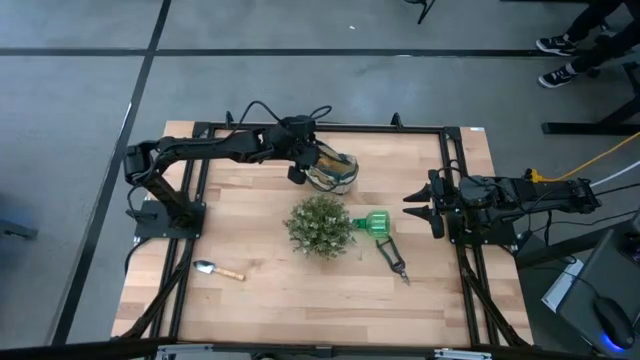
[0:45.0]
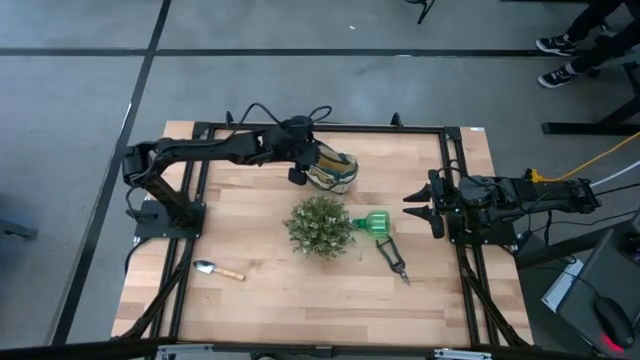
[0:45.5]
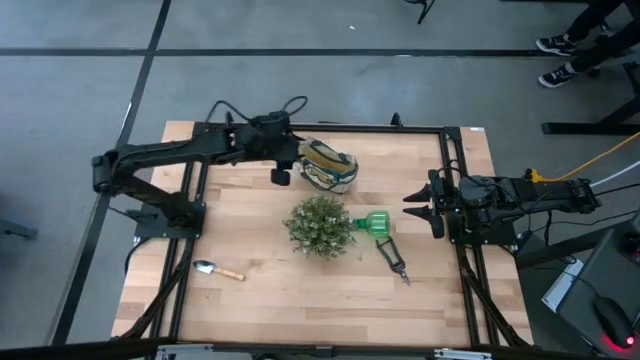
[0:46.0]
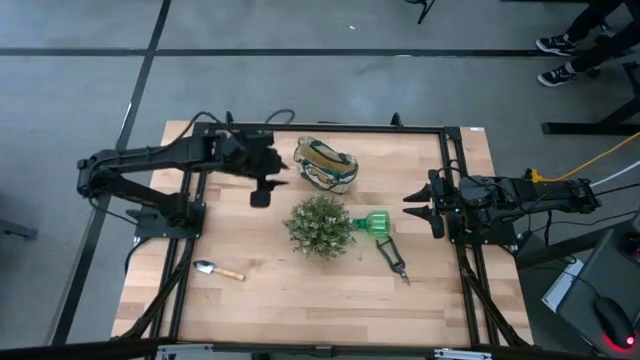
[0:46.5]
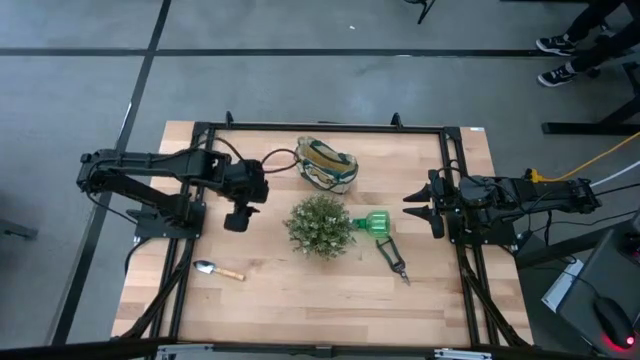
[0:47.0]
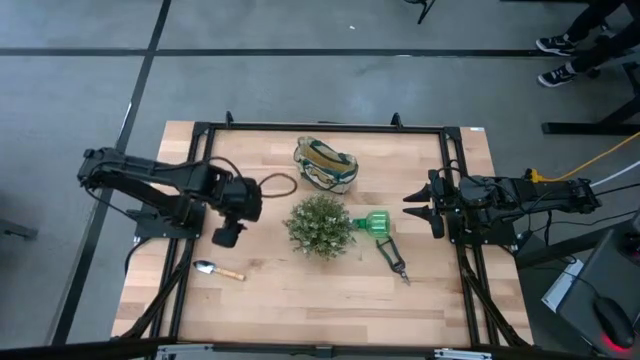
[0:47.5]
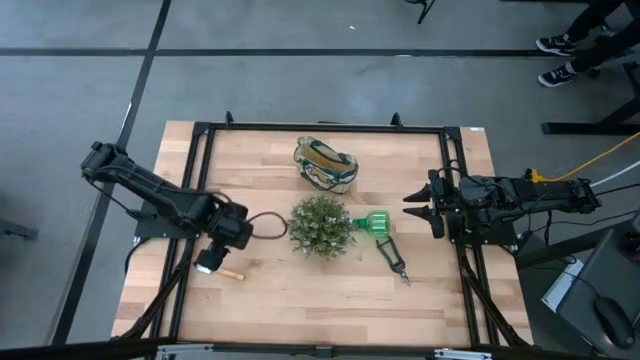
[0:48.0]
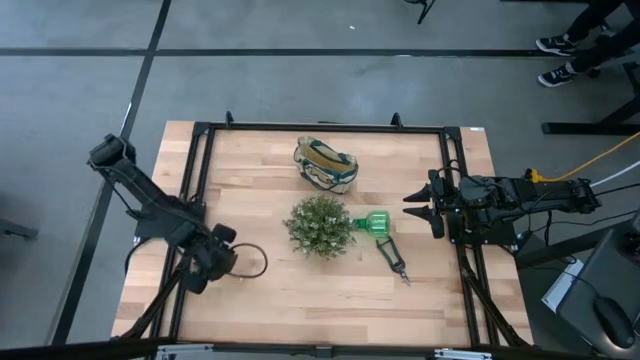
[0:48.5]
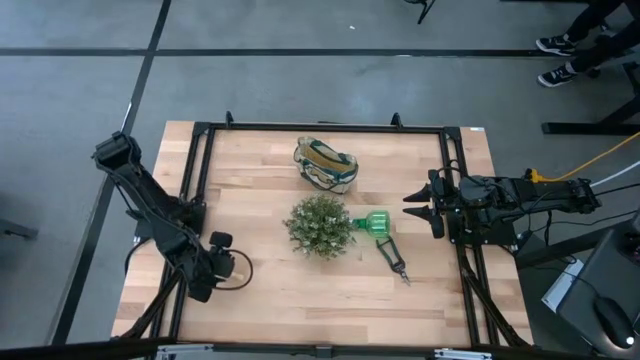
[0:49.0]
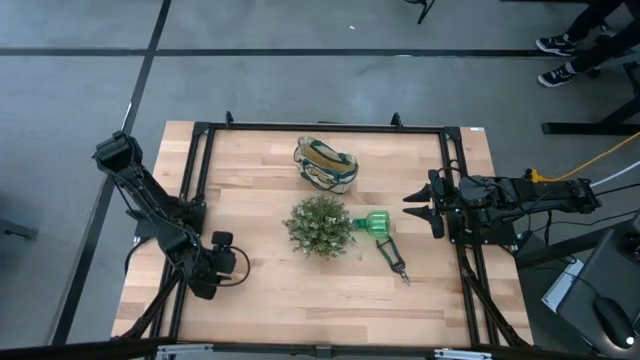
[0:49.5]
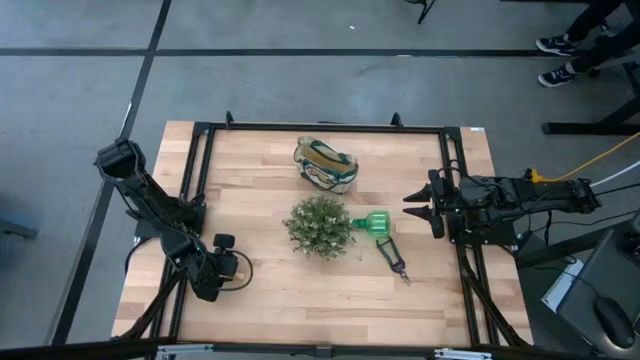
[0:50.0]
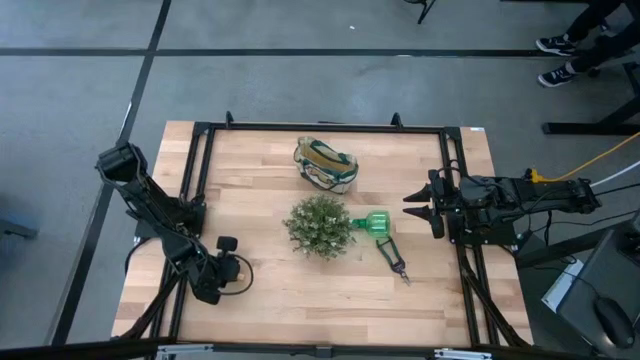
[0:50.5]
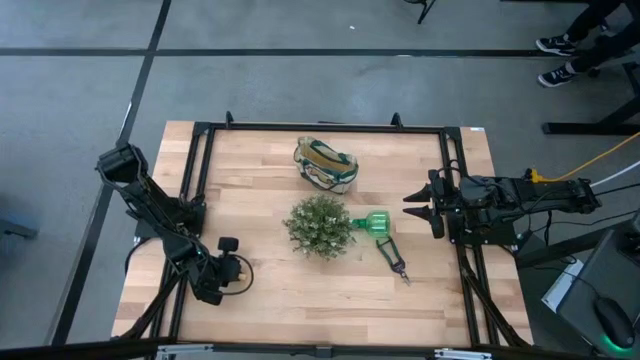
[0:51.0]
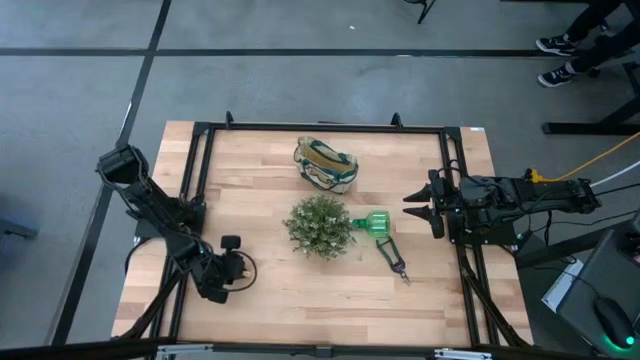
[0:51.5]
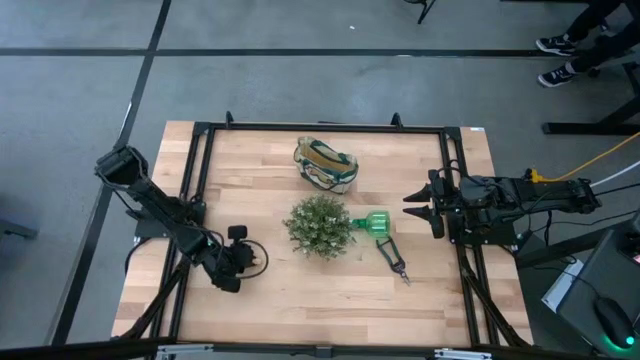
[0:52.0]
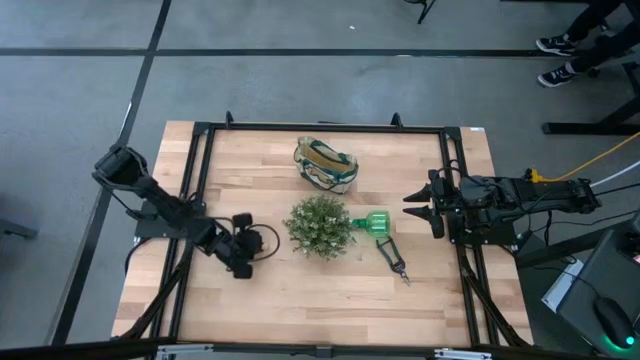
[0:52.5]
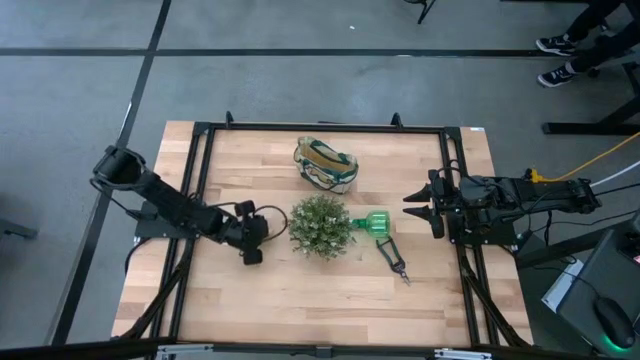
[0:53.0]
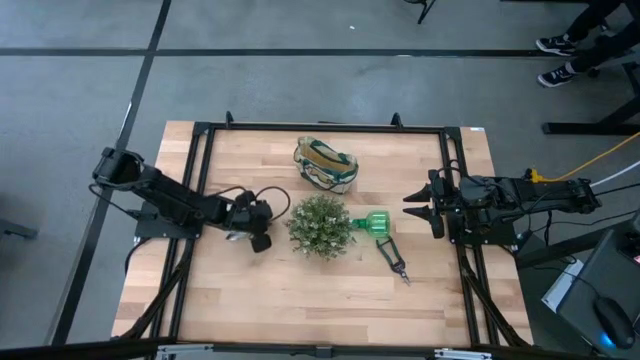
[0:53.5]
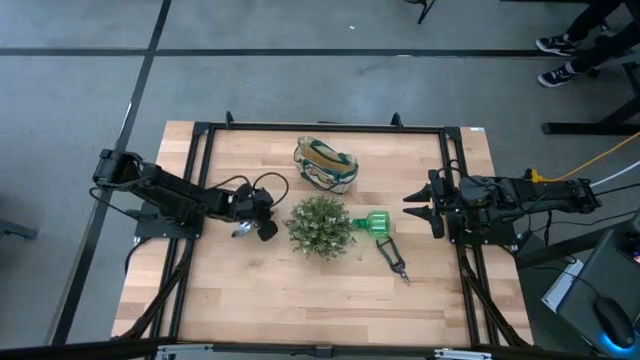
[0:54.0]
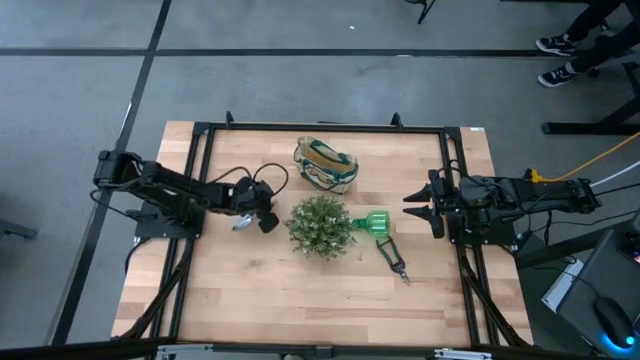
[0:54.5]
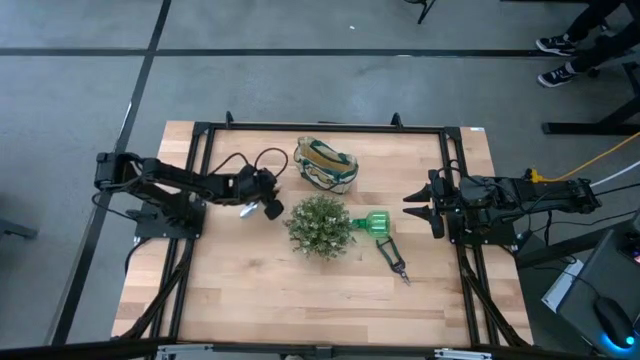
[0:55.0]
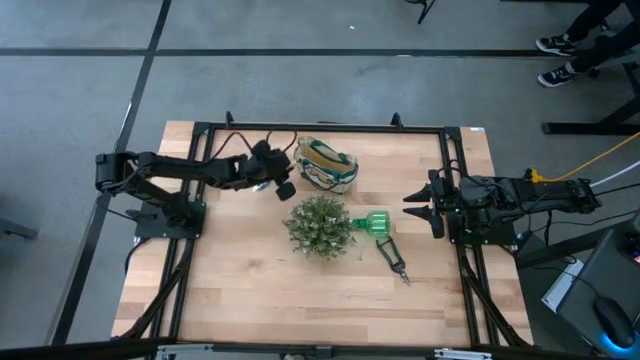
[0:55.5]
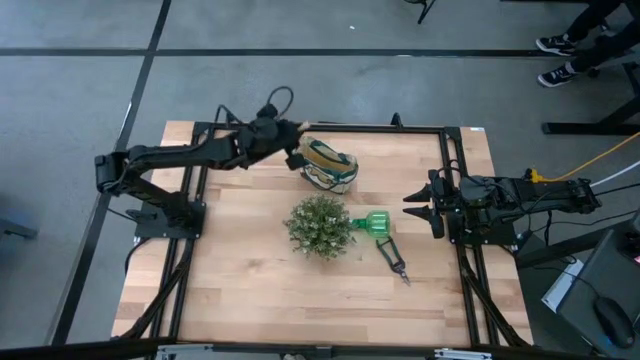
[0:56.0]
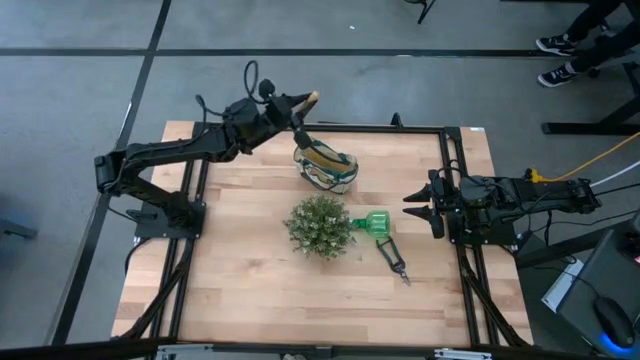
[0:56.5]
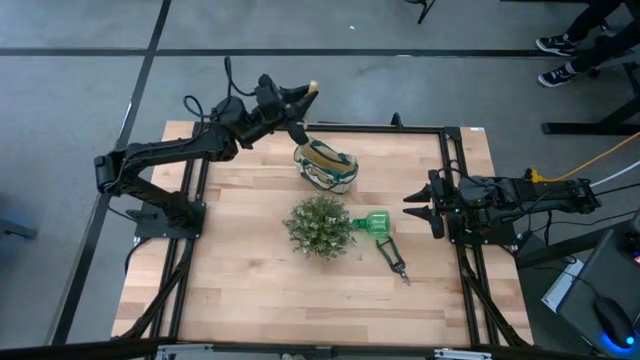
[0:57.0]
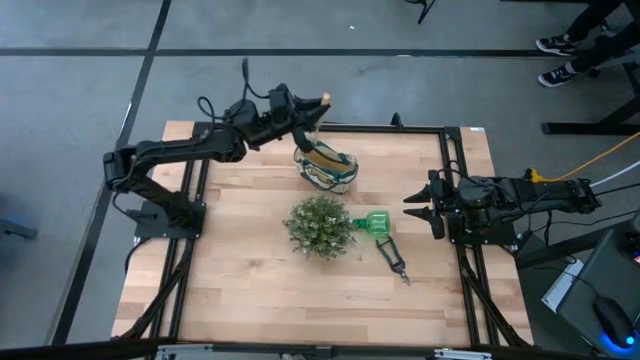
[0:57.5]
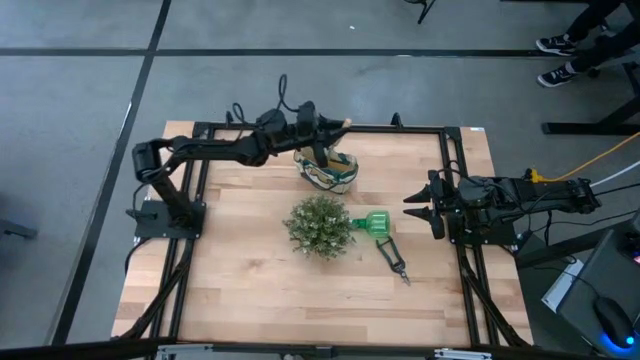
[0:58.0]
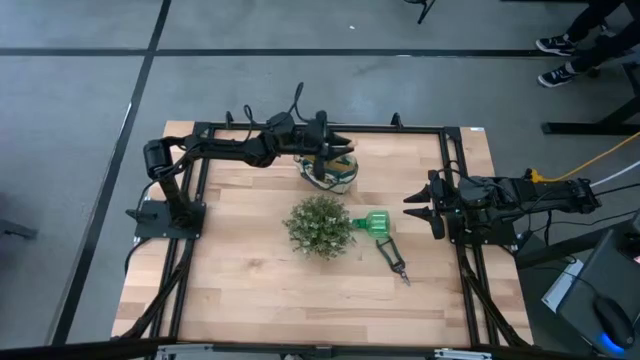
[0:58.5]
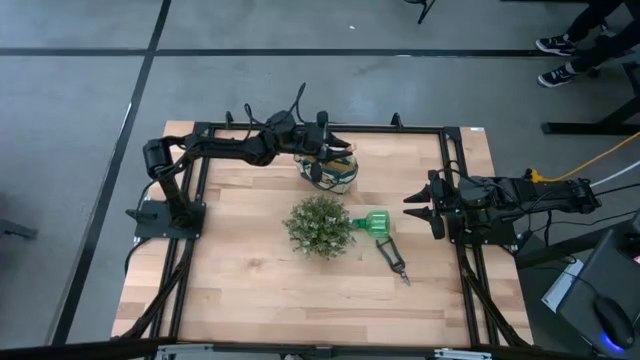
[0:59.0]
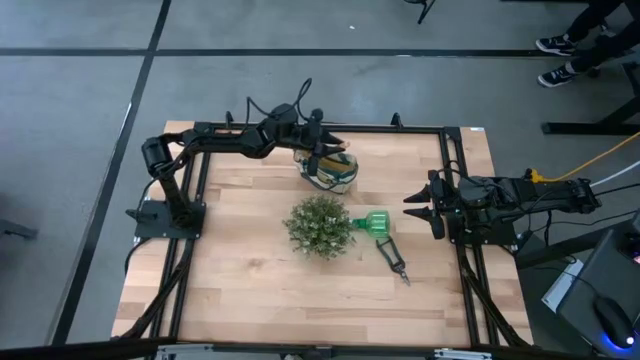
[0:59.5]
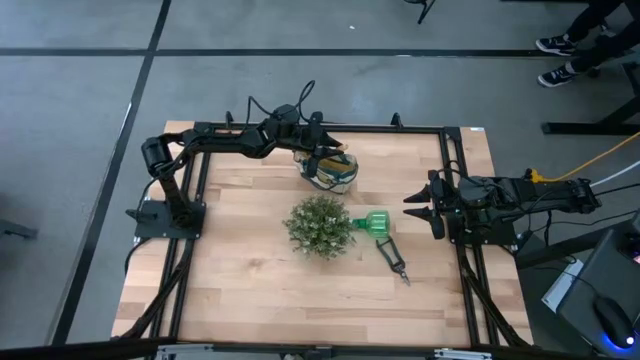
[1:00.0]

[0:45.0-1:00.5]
Task: Pick & Place Garden tools in Gardening bag
Put the brown trowel into the green gardening bag

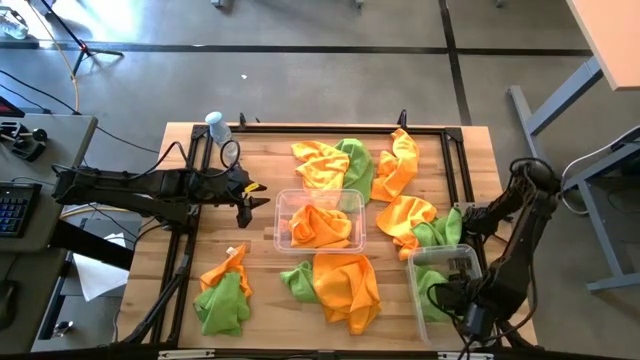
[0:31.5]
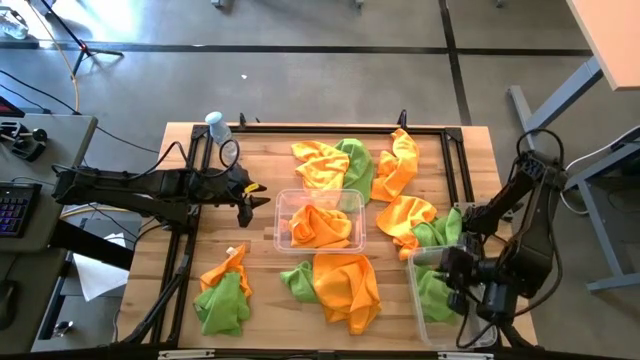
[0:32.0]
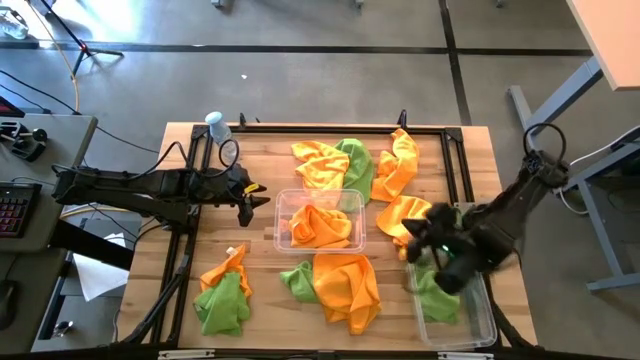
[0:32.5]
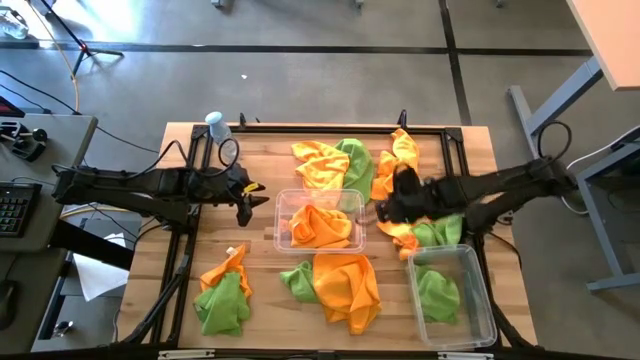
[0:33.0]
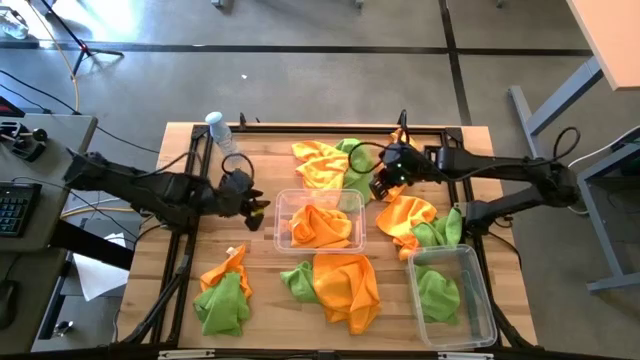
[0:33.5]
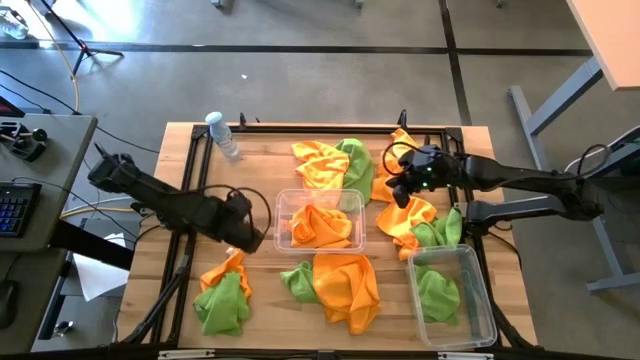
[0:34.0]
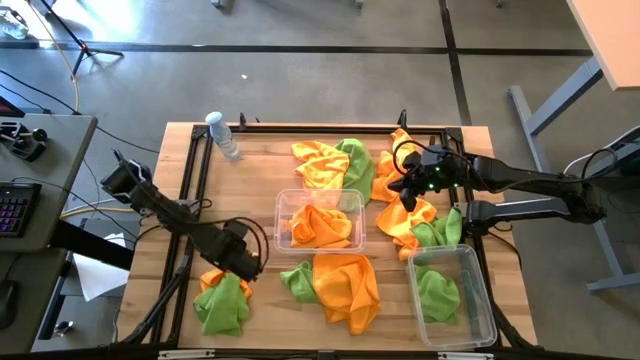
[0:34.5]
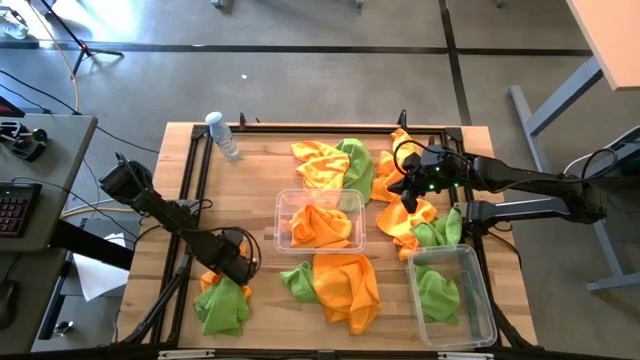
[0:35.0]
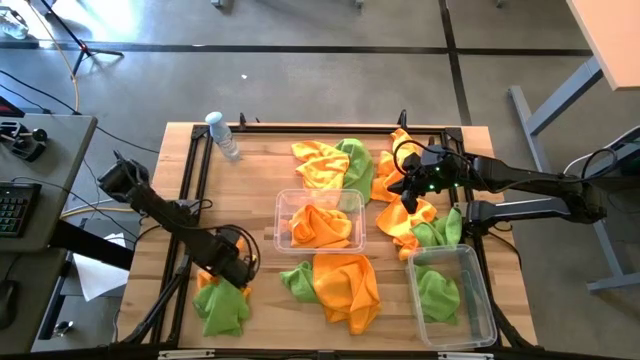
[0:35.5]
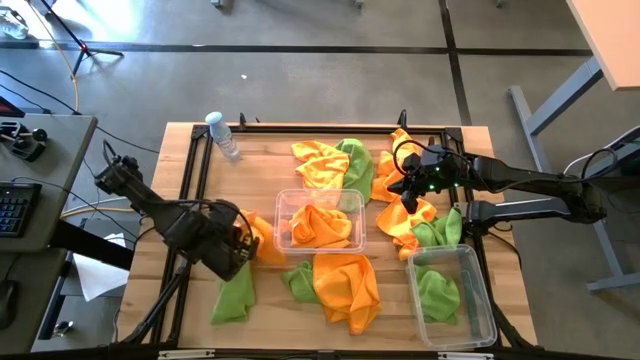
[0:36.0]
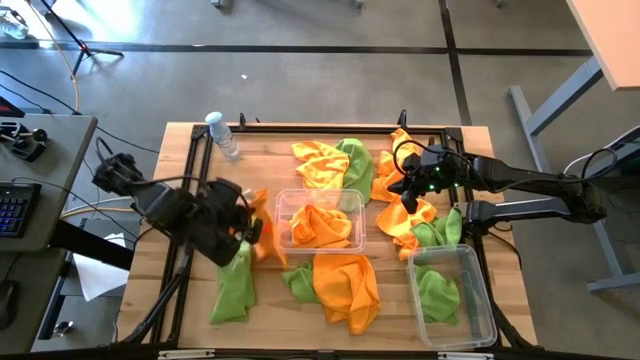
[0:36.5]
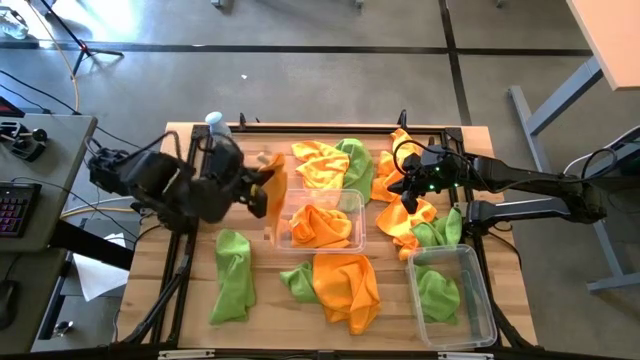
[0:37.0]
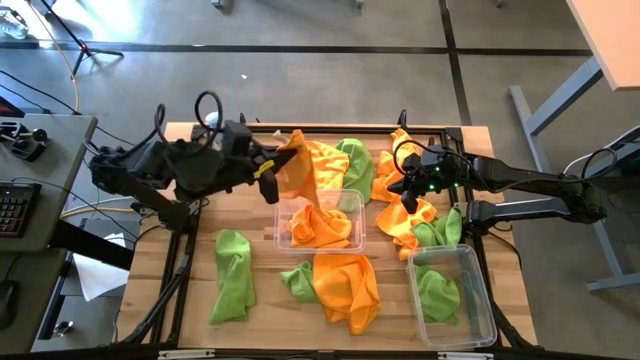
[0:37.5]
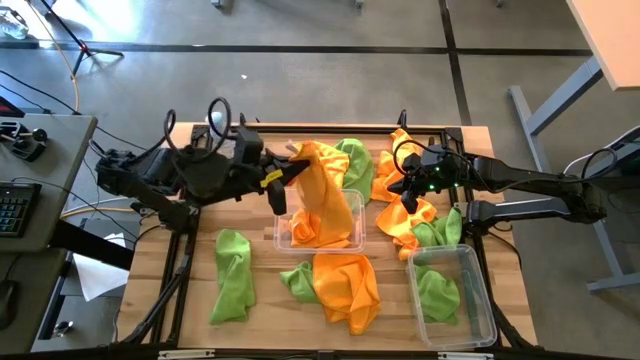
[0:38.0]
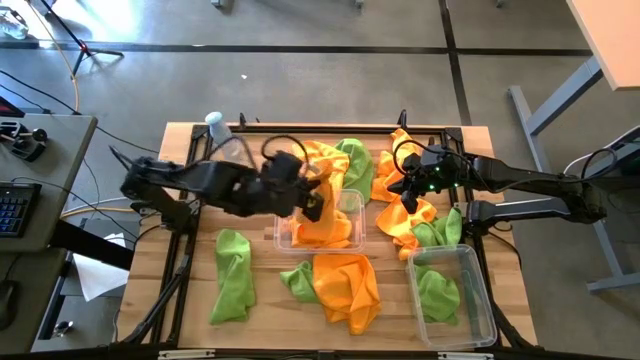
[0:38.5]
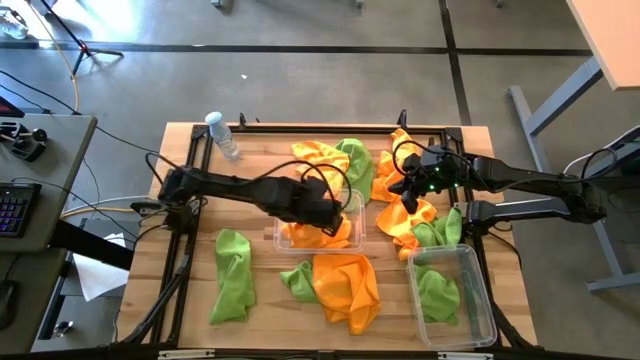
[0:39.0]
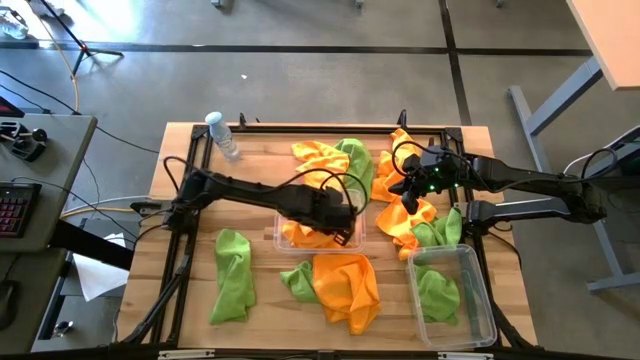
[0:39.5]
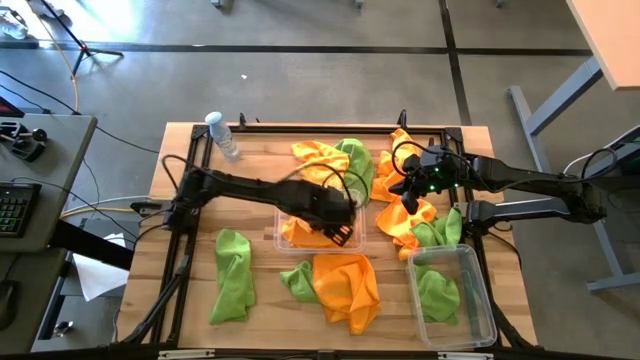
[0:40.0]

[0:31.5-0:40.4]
Task: Sort microfiber towel by color & place in baskets
Put the orange towel into the top transparent bin
